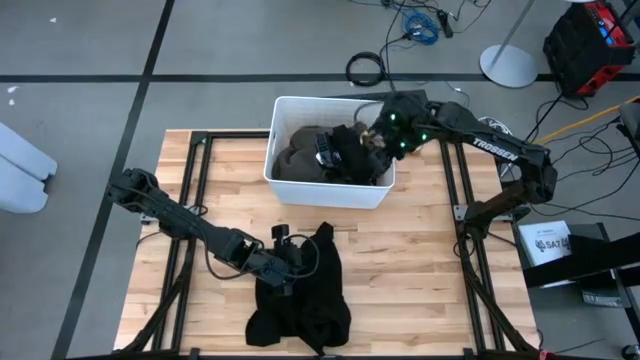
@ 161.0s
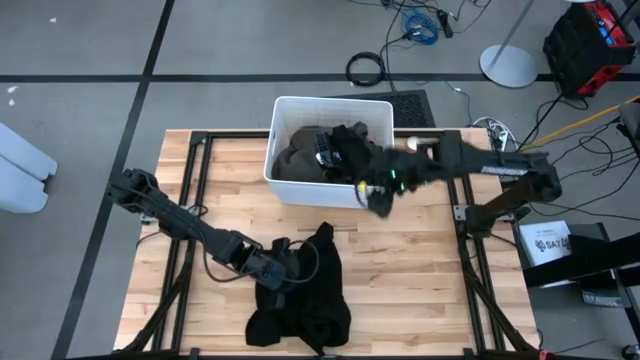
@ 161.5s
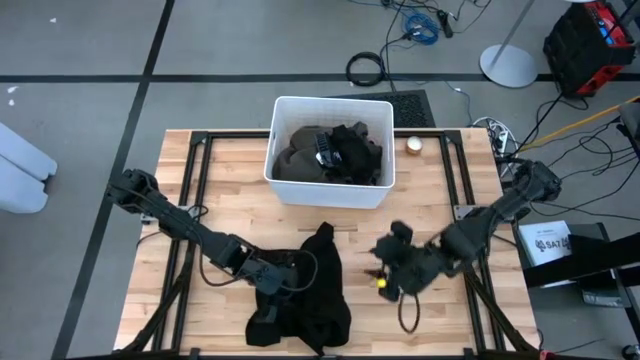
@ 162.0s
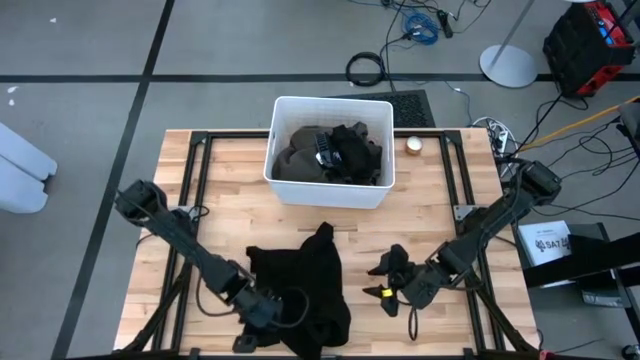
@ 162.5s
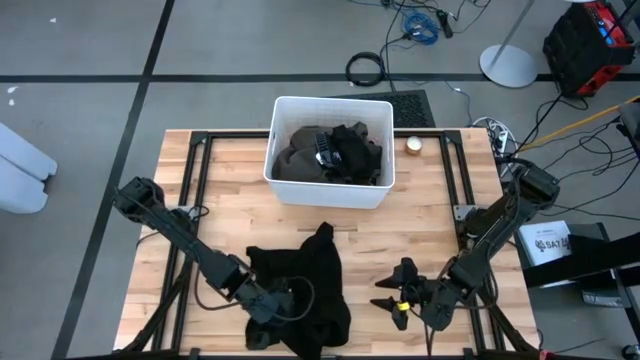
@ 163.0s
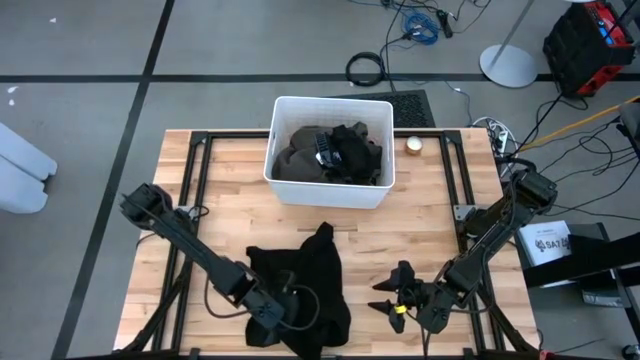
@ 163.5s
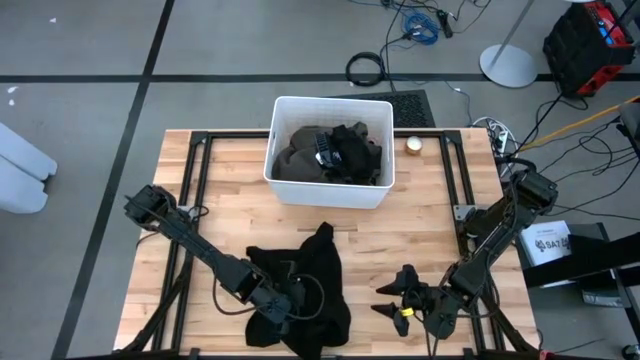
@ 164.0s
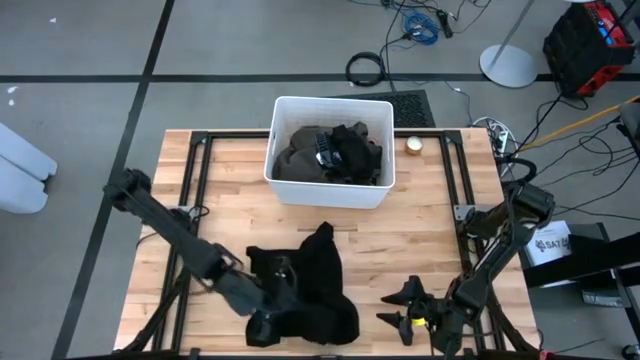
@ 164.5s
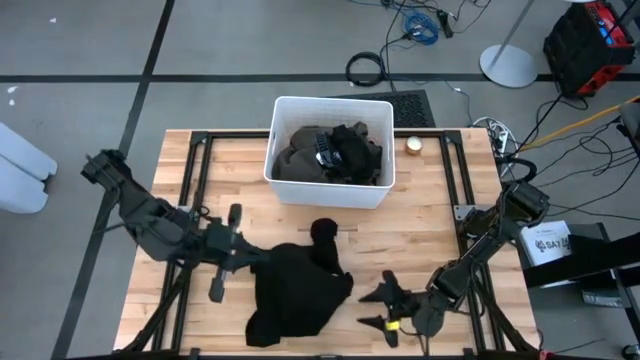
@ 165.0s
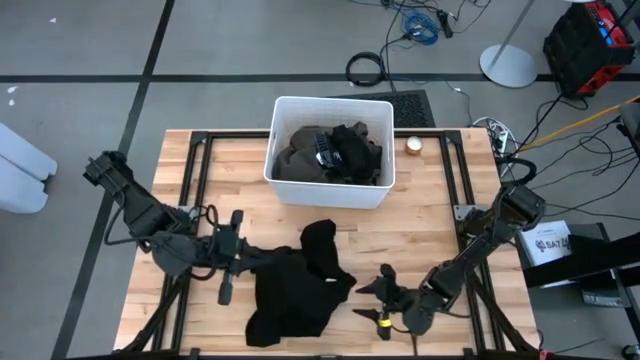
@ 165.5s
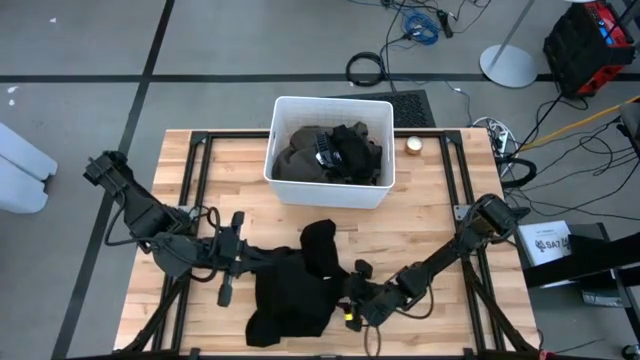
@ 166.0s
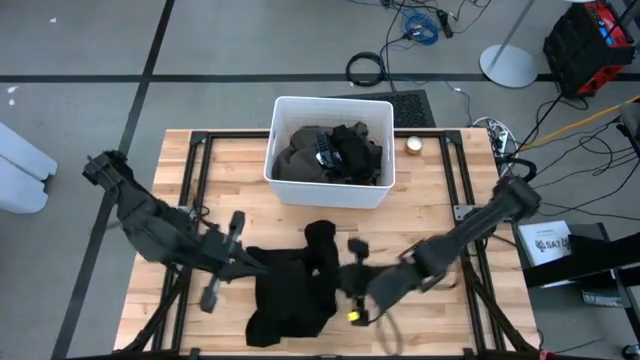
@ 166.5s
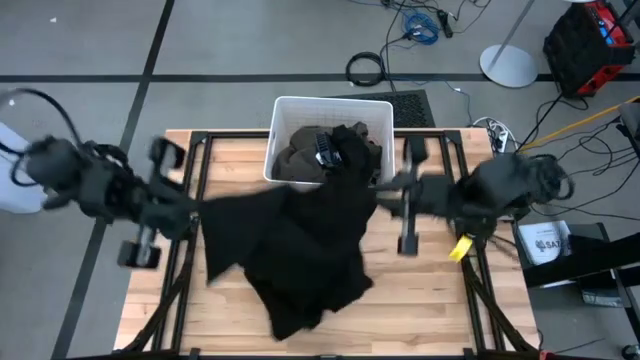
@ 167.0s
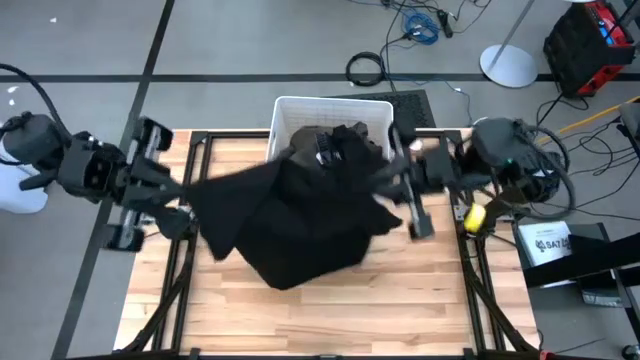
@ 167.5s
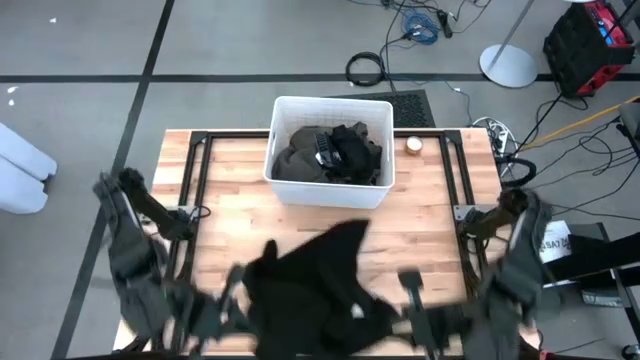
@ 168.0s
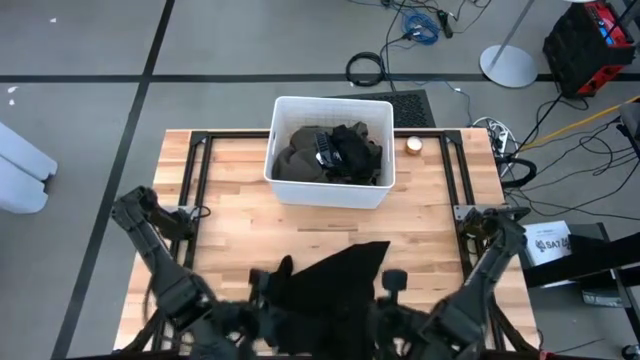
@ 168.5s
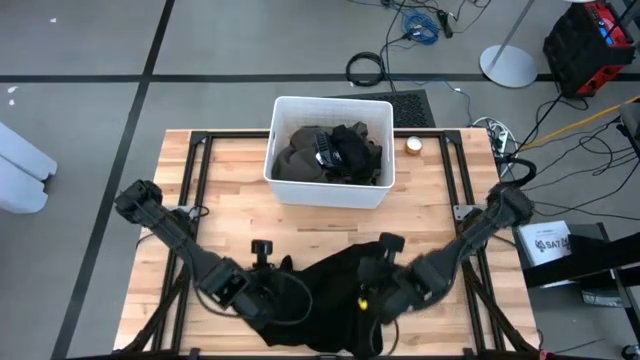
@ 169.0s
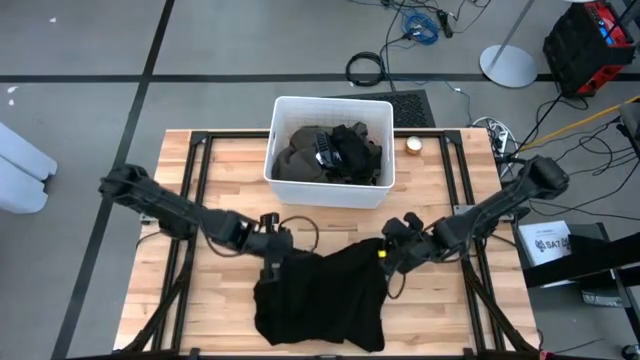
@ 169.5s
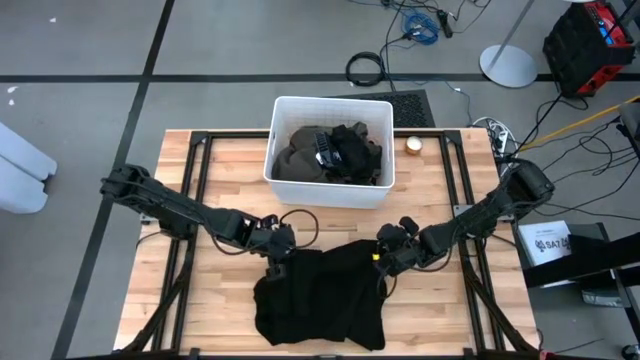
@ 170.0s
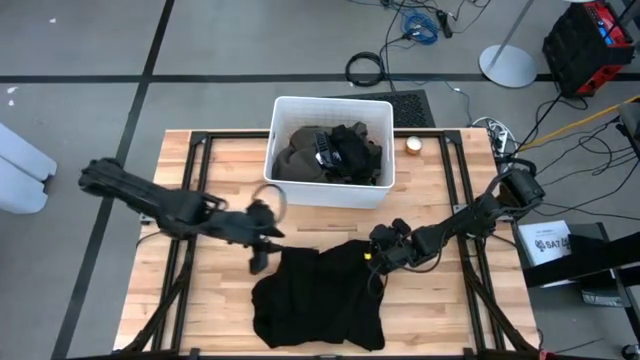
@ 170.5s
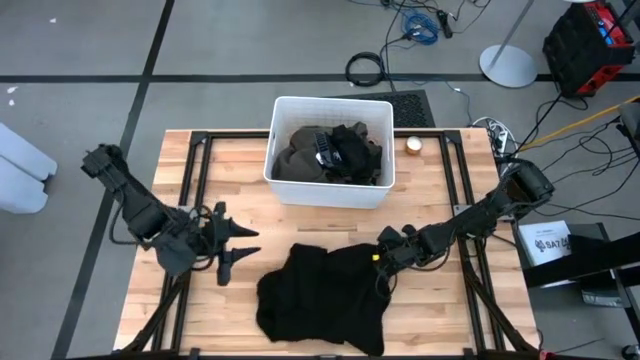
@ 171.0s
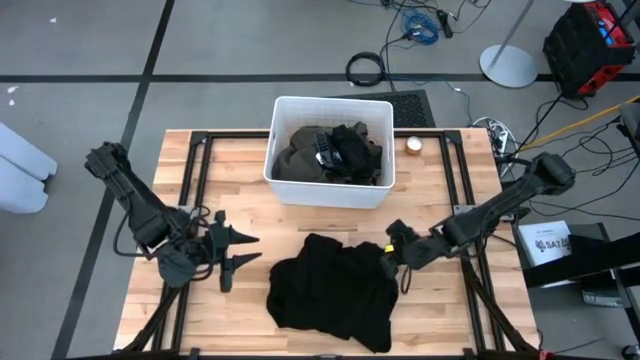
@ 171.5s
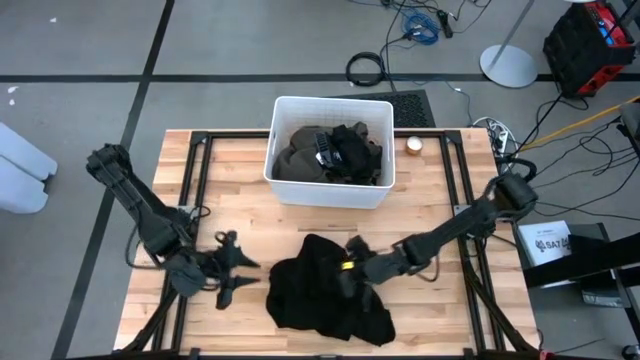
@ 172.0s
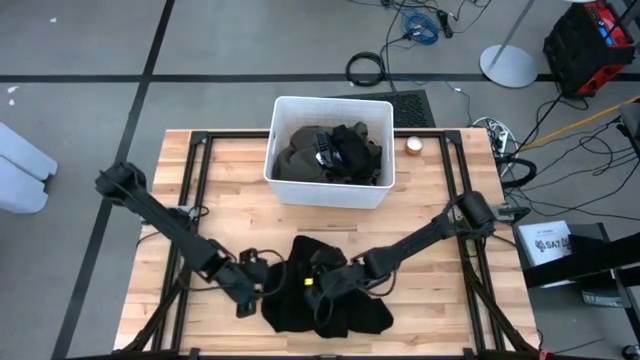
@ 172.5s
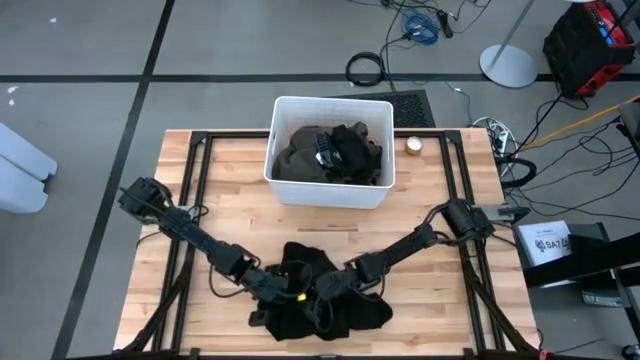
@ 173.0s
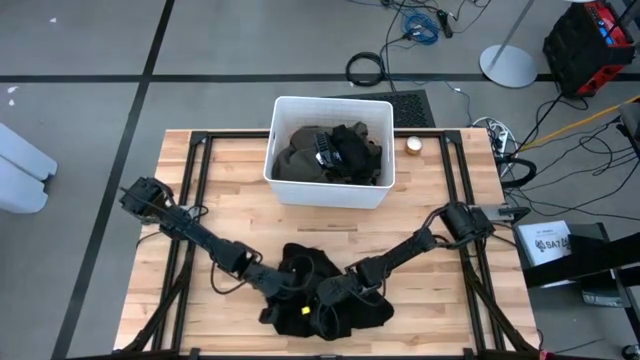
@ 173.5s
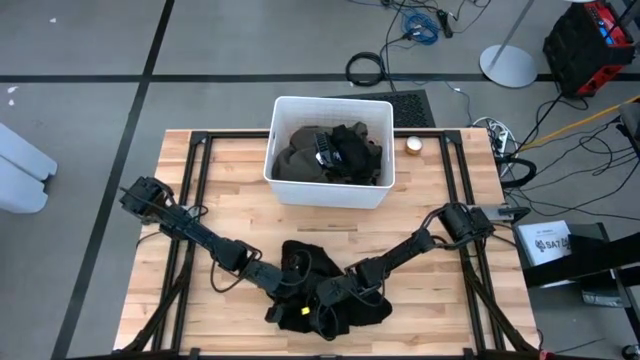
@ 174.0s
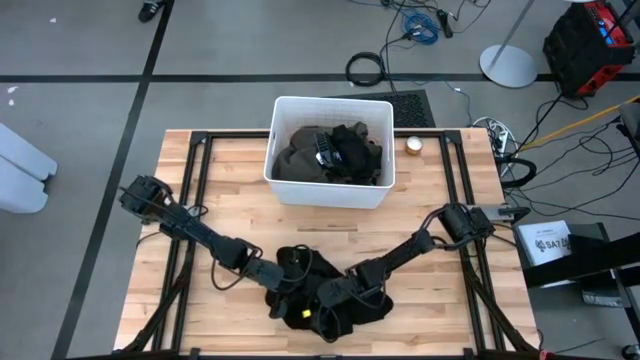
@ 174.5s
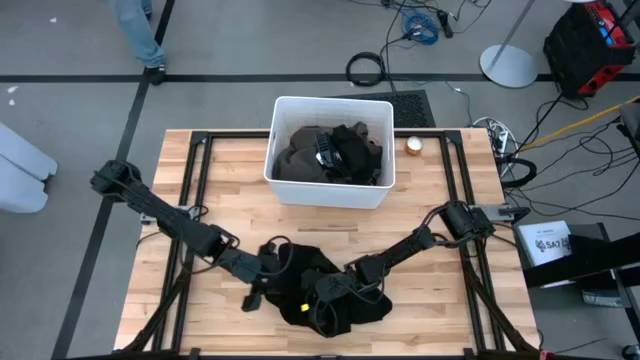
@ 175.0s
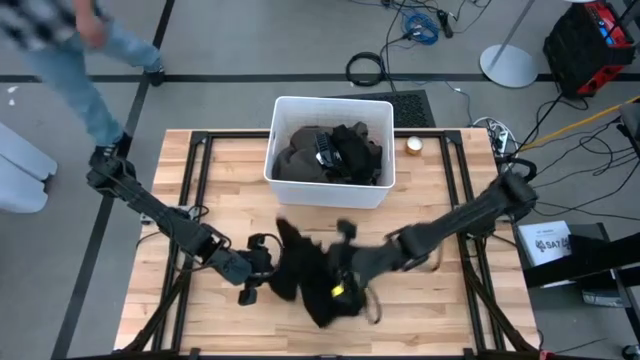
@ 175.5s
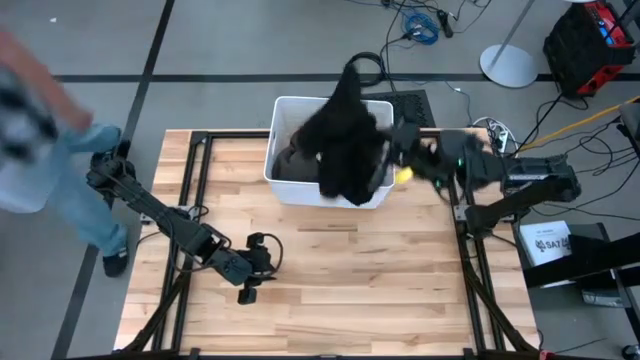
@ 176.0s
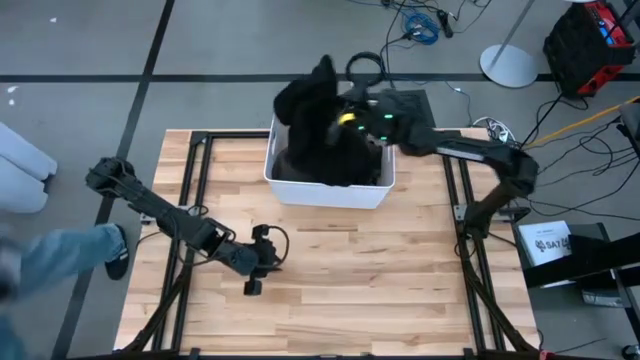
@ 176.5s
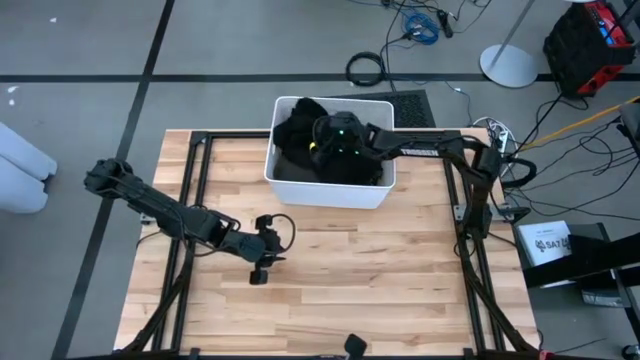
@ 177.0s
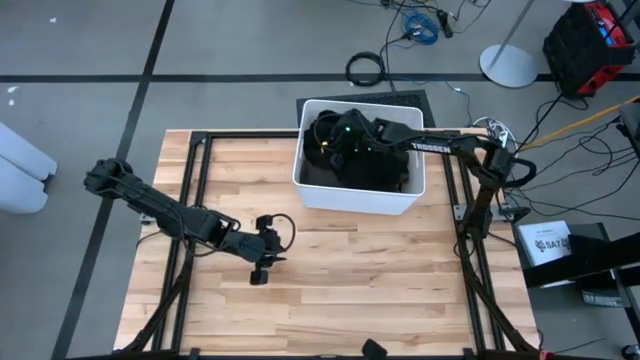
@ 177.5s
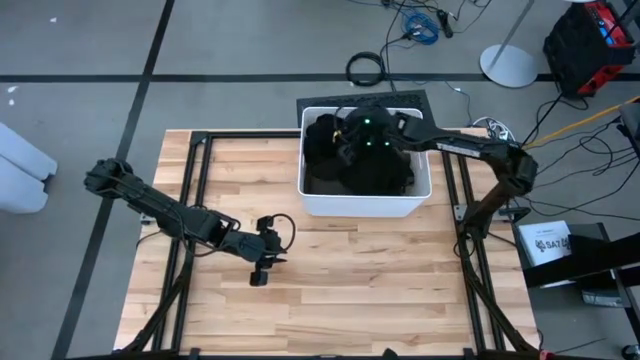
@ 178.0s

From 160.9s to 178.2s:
Task: Sort clothes
Put the black shirt into the white laundry bin

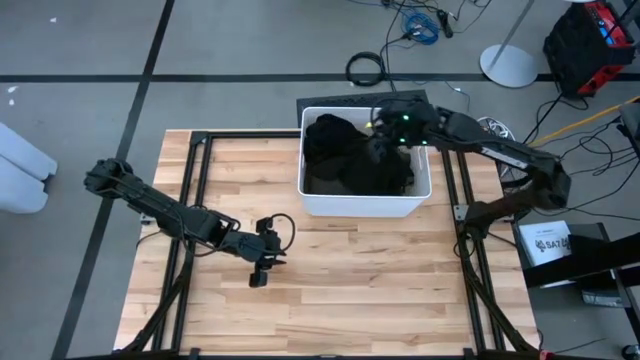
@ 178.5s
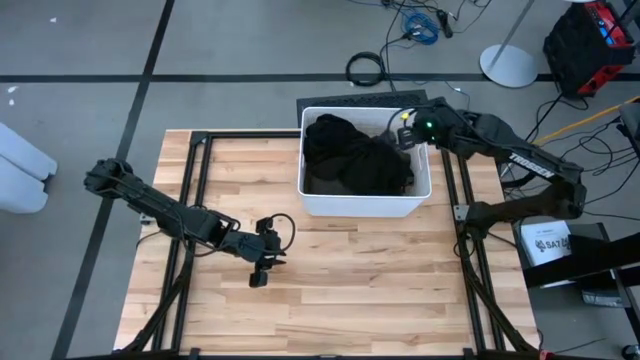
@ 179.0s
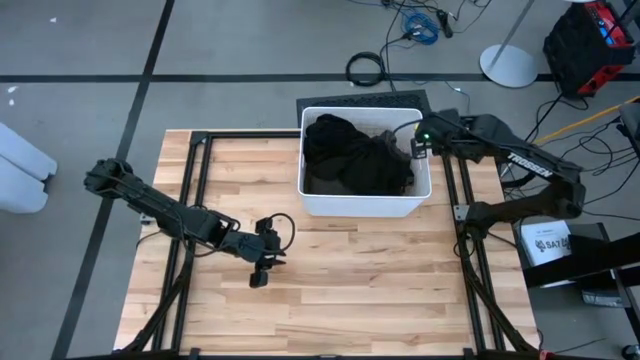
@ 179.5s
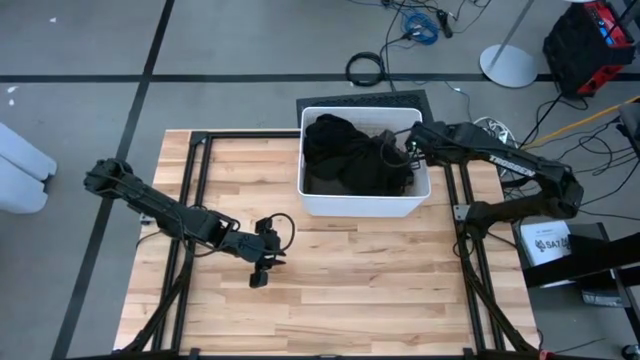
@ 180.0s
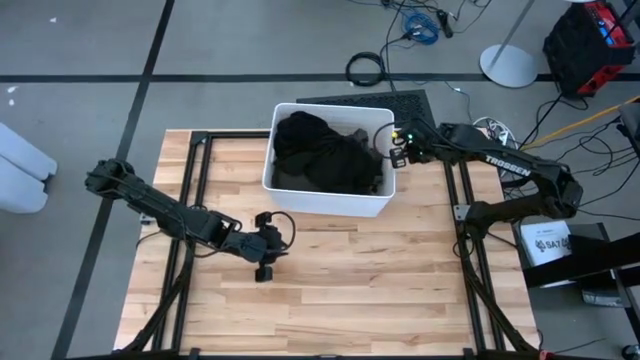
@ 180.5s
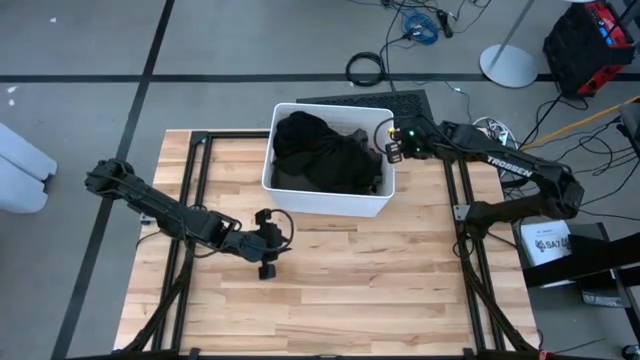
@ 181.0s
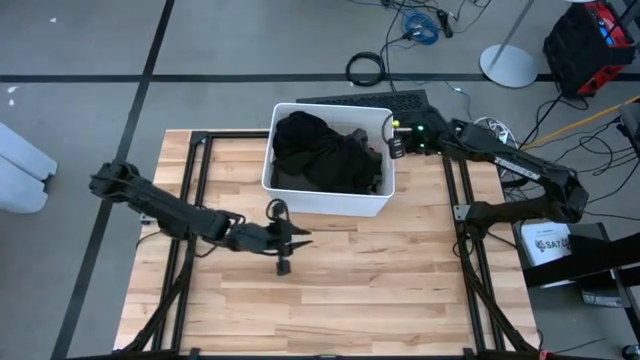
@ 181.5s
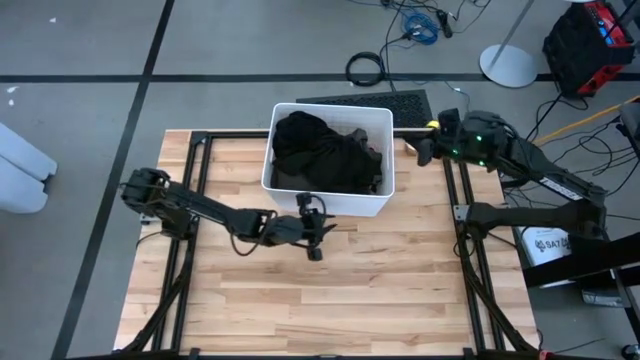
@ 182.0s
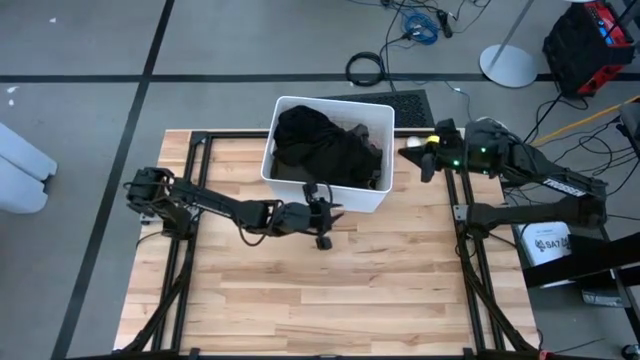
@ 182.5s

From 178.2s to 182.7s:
Adjust the white laundry bin
